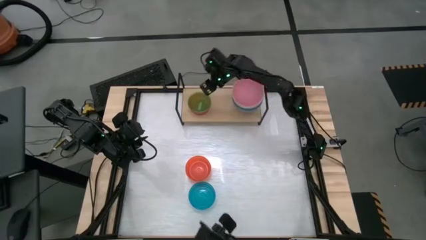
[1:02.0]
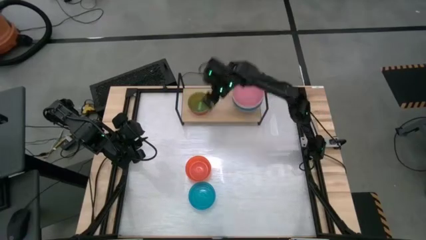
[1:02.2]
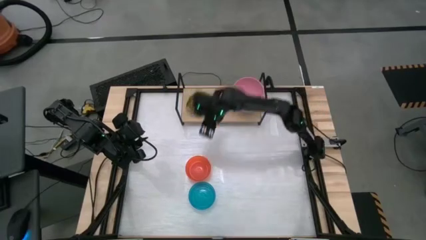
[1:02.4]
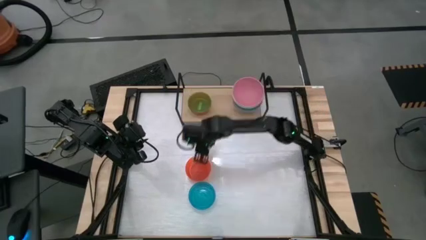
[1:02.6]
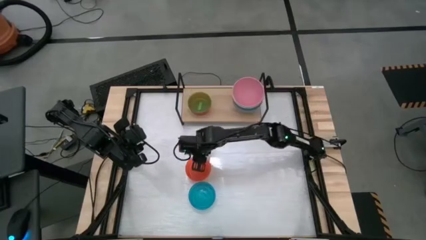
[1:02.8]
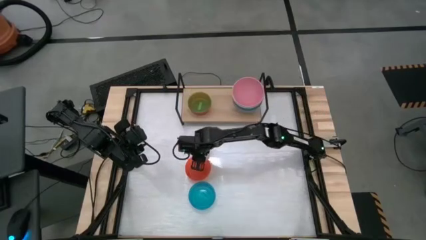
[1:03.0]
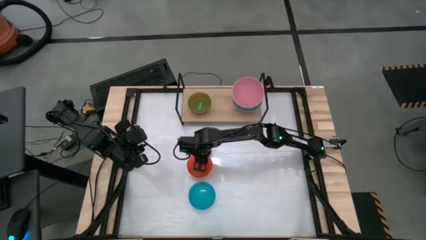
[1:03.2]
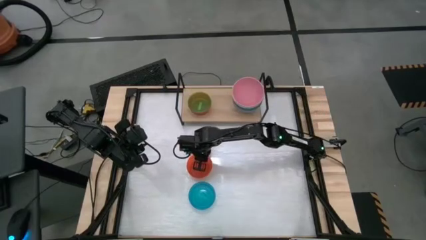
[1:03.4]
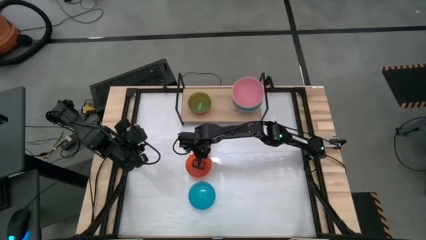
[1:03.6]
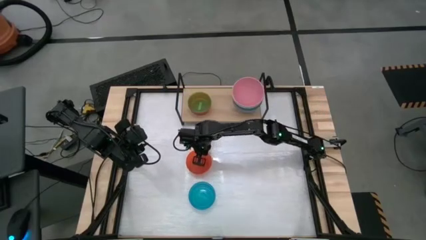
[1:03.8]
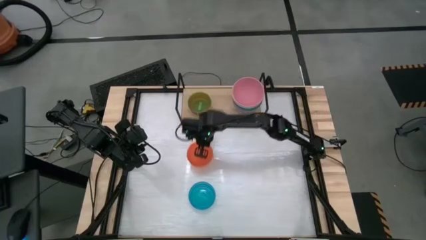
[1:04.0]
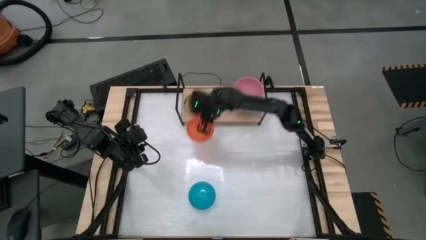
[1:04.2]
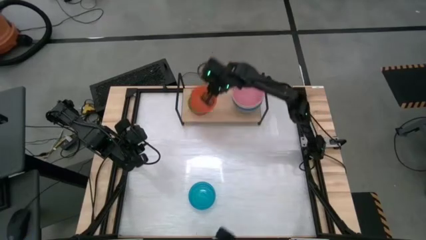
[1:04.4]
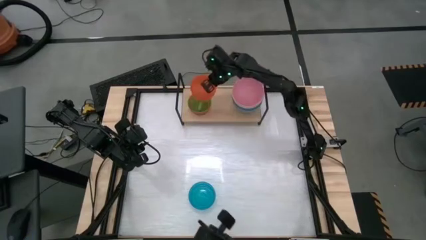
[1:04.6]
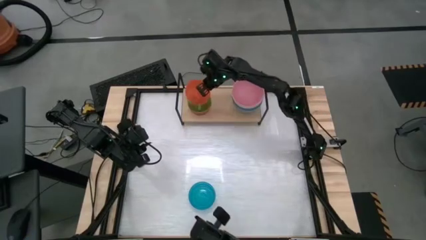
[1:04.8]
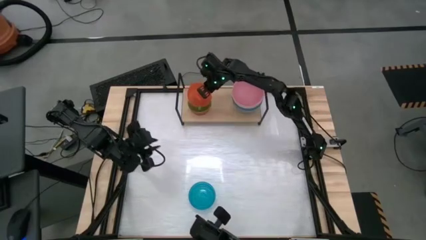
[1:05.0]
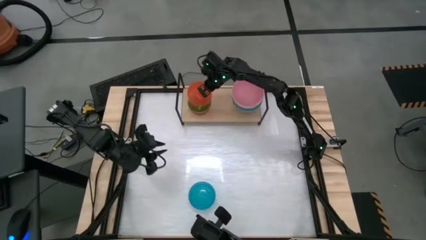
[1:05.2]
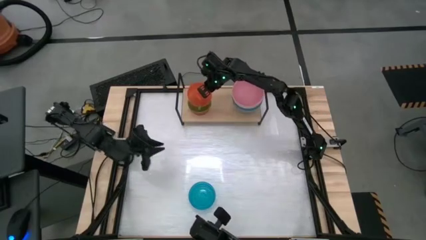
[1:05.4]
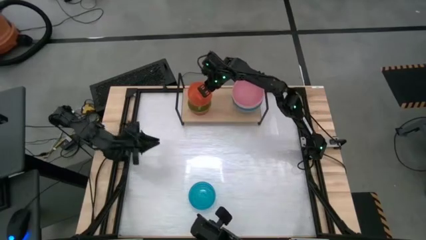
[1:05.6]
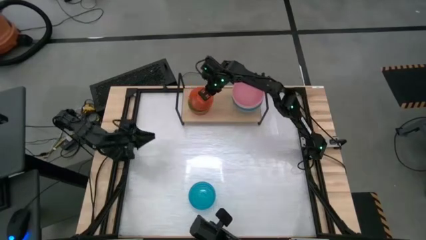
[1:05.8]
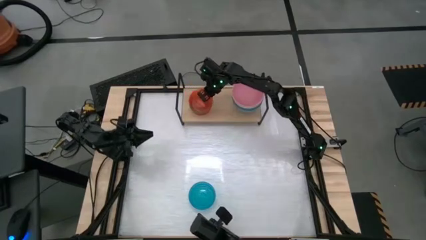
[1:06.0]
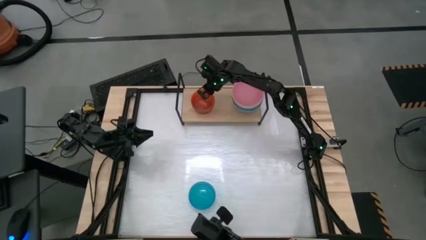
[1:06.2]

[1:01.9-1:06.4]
Task: Place and stack bowls onto a shelf
Stack the small orange bowl on top of the small light green bowl on the shelf

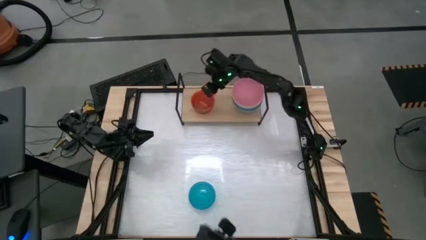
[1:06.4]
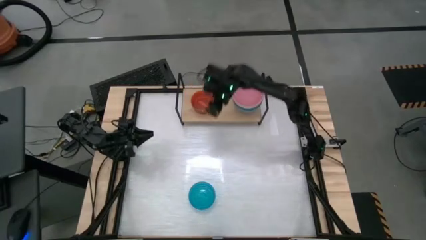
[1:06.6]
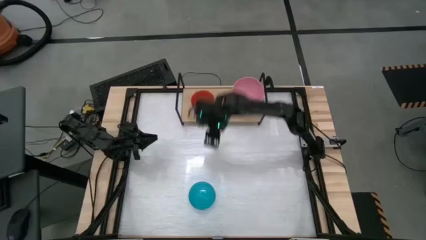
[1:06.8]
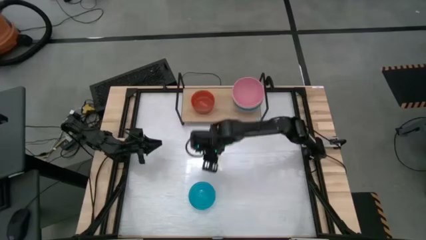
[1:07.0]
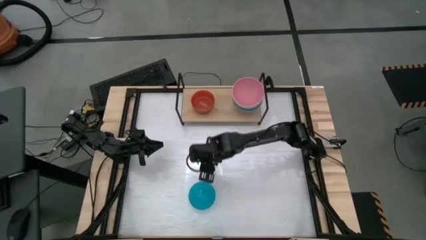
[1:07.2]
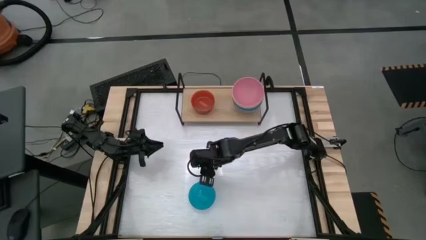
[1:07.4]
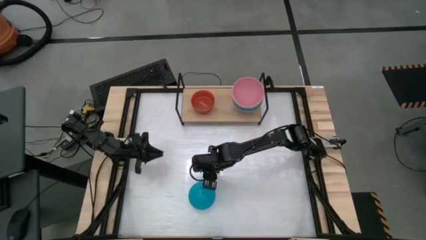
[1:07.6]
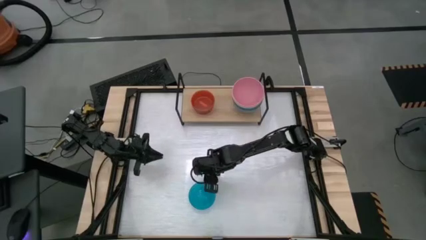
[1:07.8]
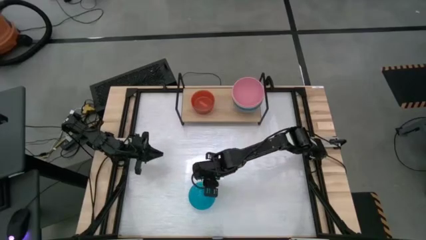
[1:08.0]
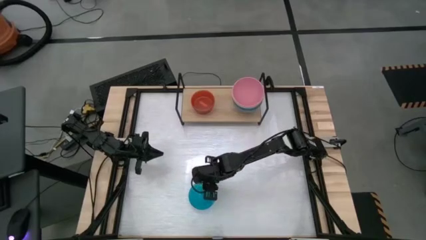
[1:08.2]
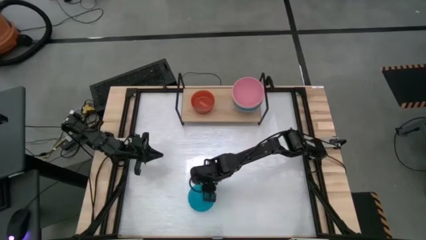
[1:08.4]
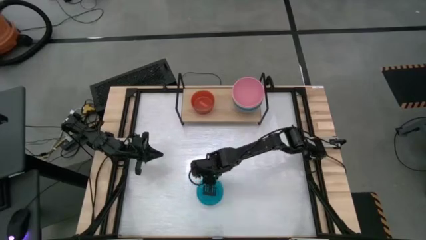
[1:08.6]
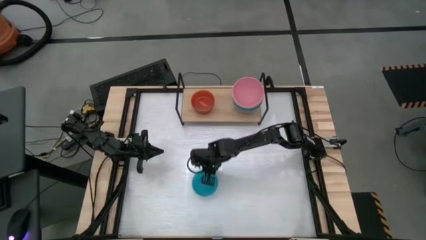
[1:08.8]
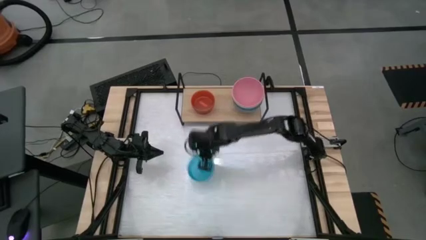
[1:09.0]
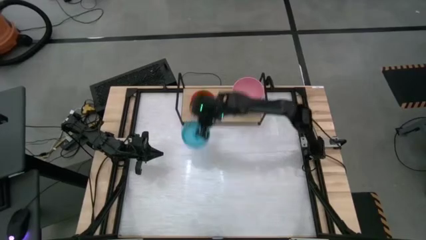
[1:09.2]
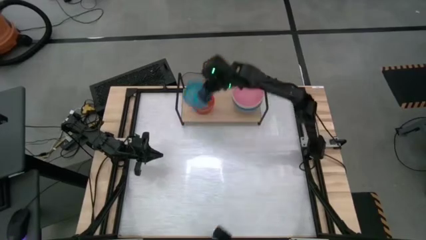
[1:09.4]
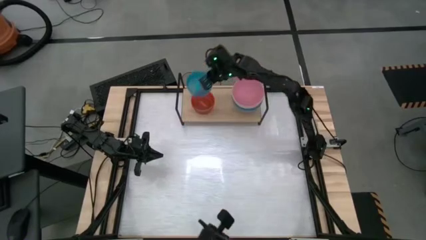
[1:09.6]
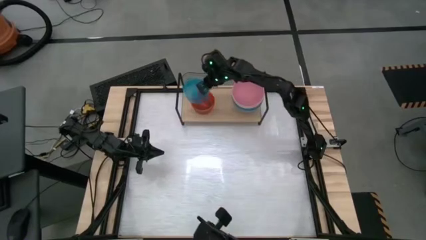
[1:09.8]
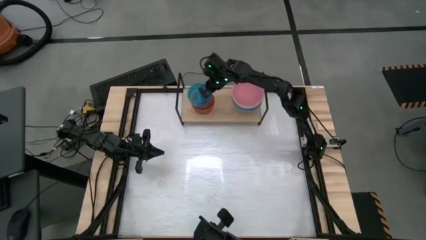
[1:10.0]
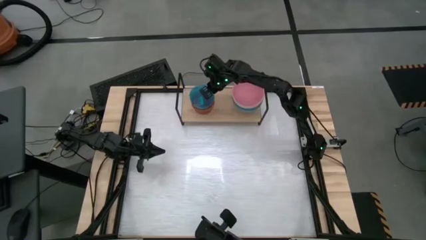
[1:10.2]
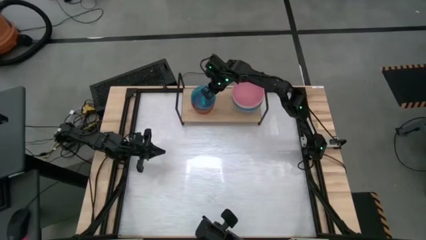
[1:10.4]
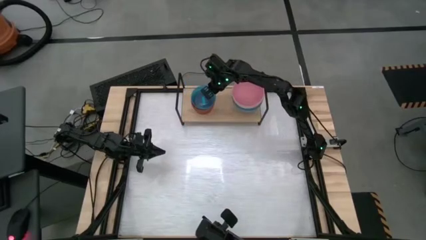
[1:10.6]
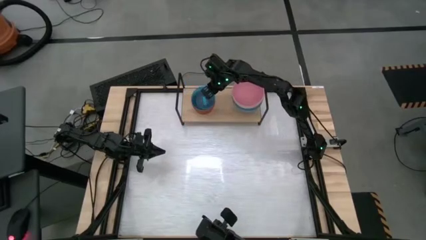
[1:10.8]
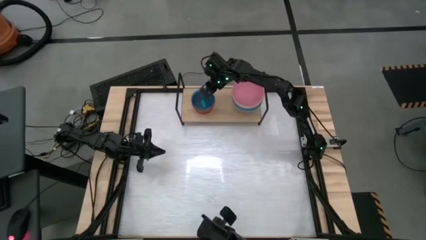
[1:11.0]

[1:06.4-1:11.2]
Stack the small light blue bowl on top of the small orange bowl on the shelf

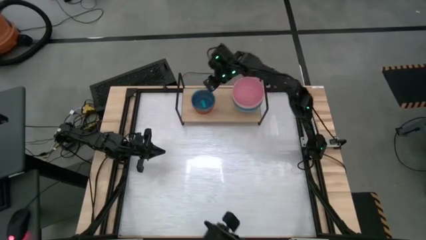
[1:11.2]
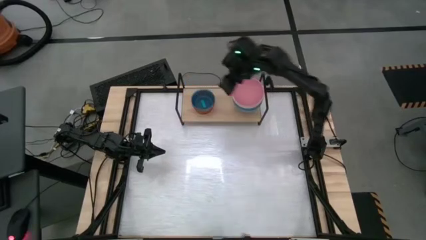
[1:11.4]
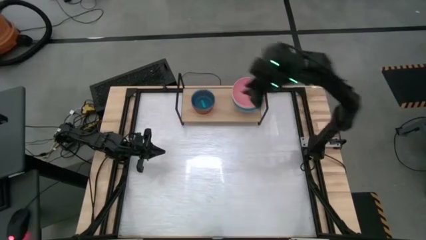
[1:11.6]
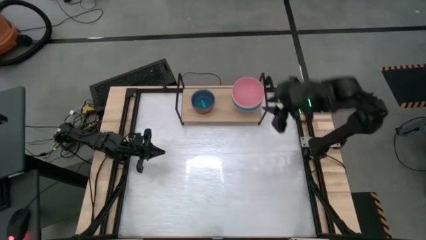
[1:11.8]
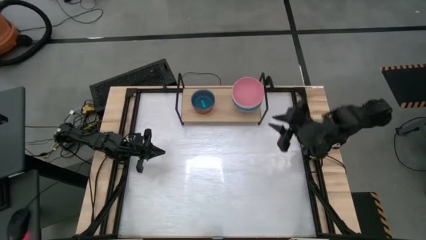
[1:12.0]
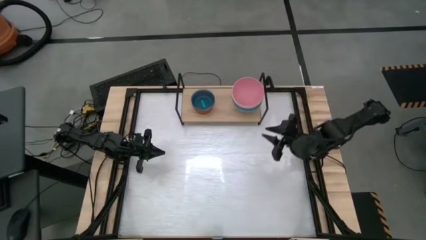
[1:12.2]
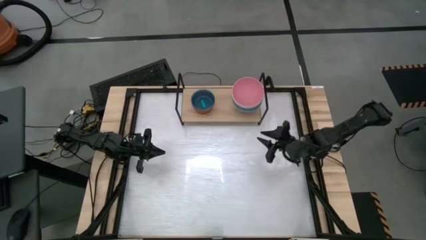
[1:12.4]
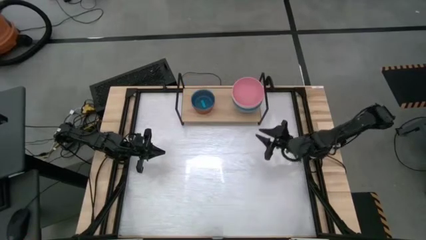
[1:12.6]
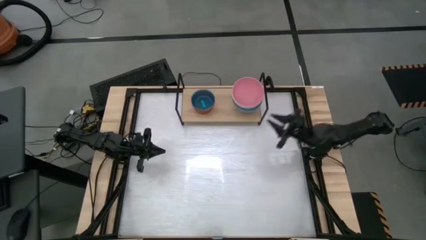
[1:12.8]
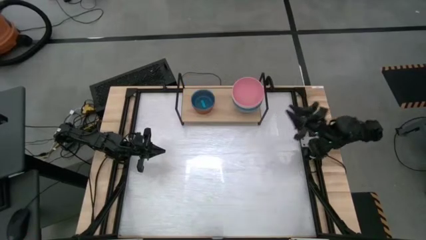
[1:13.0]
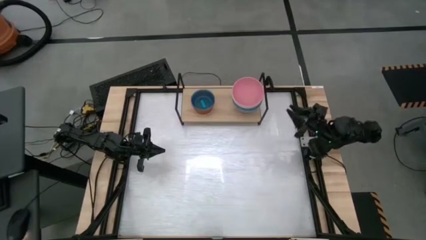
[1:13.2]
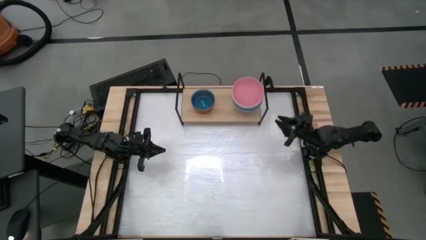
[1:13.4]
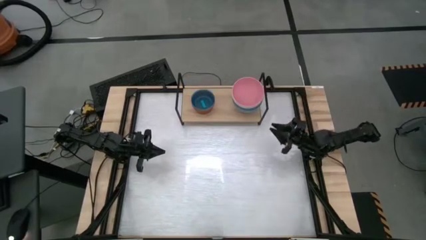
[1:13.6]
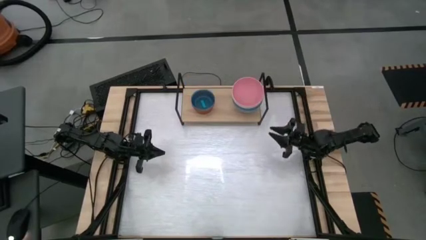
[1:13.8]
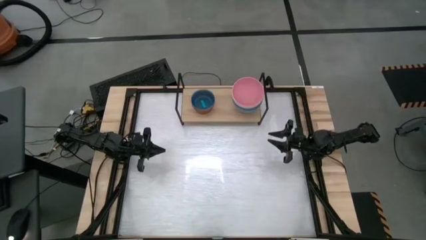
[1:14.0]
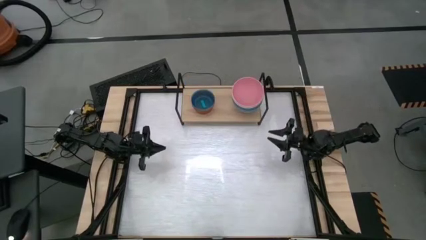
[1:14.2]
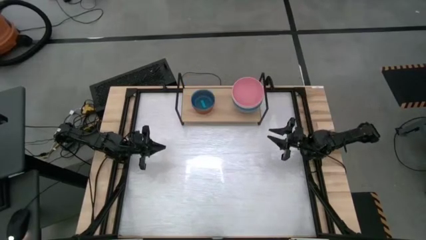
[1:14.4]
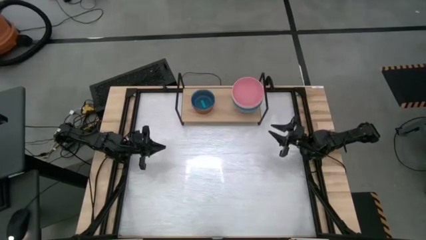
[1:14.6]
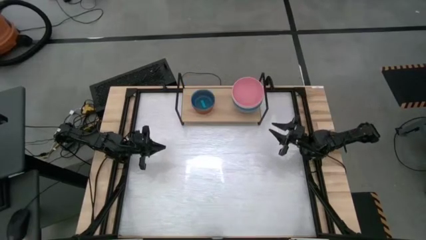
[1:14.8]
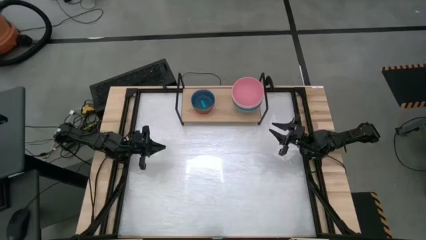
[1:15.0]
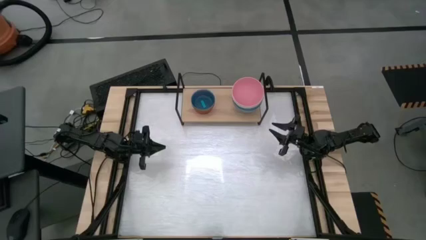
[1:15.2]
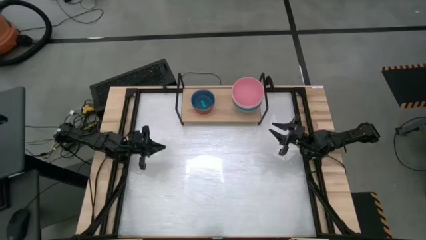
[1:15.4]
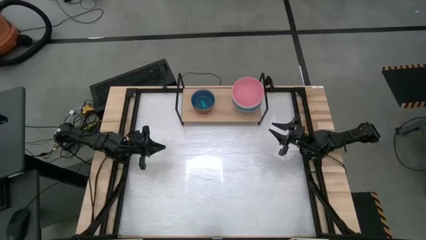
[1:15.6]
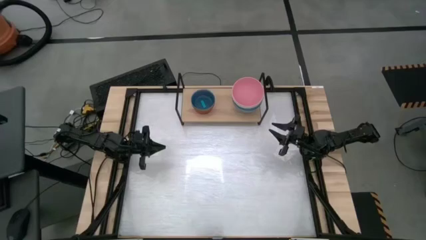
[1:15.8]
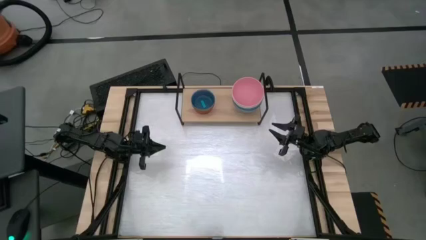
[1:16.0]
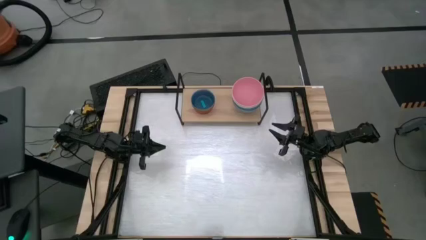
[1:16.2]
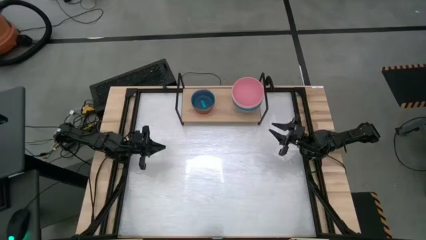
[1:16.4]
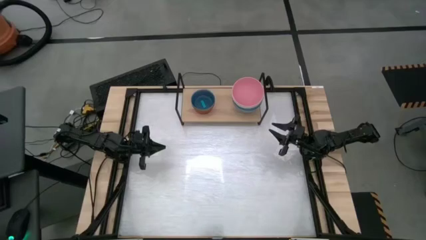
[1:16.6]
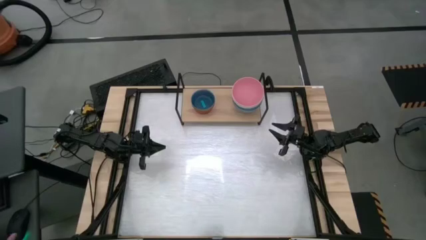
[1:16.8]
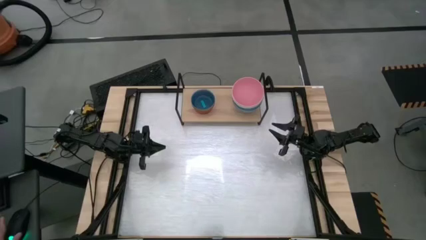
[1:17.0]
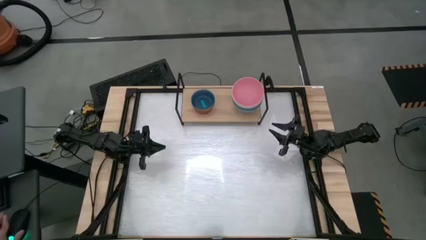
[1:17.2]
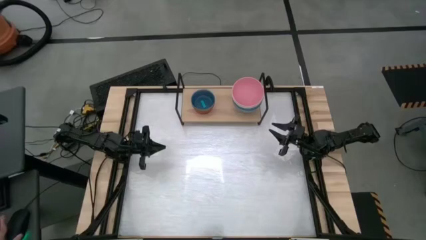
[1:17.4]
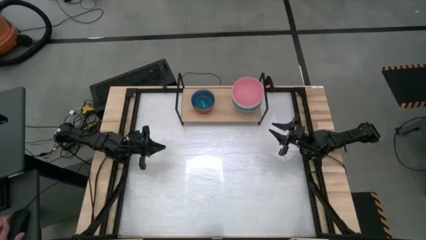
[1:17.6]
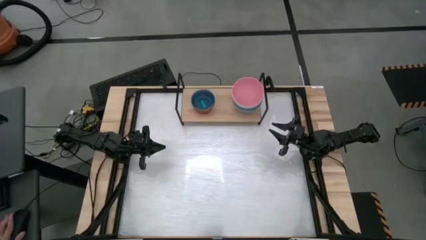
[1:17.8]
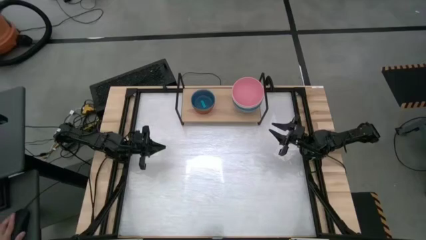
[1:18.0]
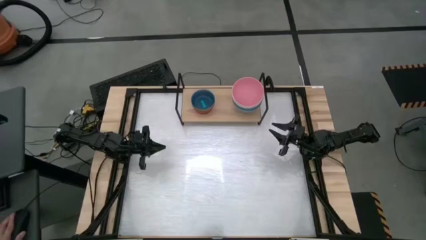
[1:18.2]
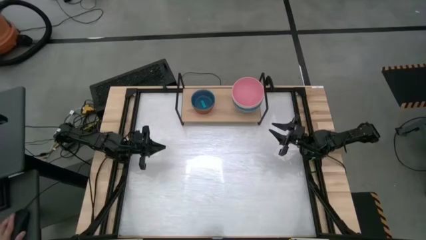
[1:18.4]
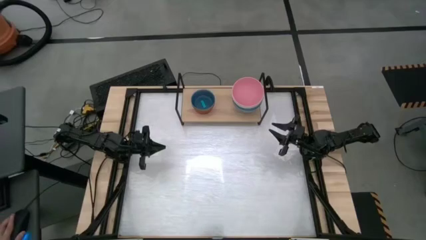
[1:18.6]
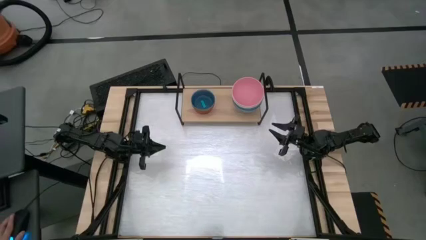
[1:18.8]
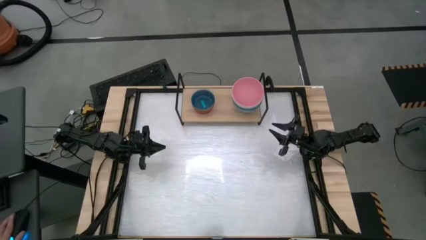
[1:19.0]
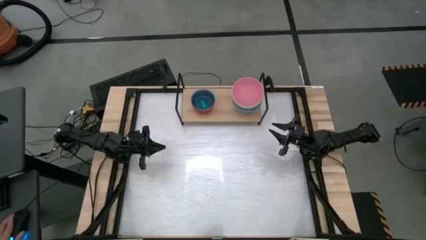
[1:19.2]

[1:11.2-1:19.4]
Return to Home Position
